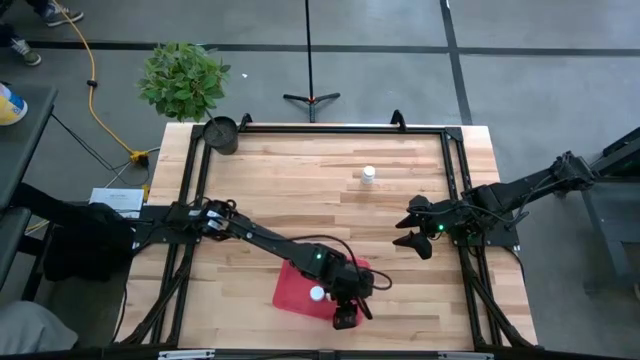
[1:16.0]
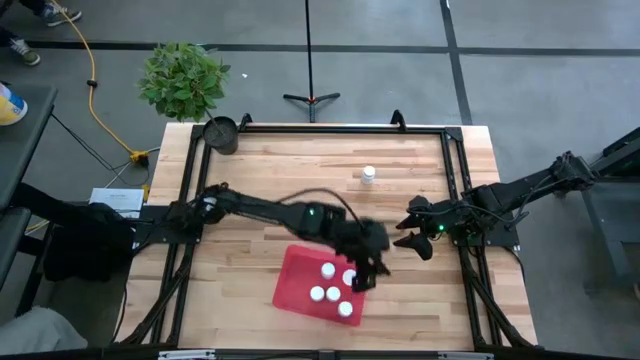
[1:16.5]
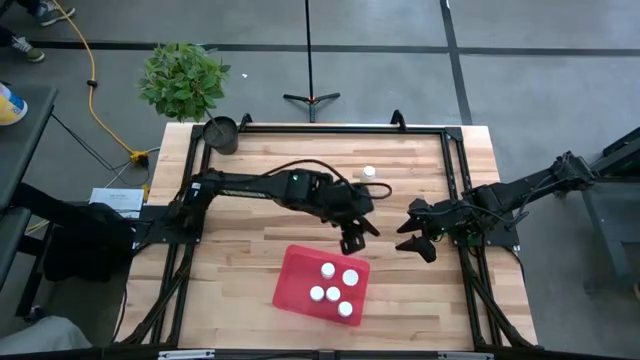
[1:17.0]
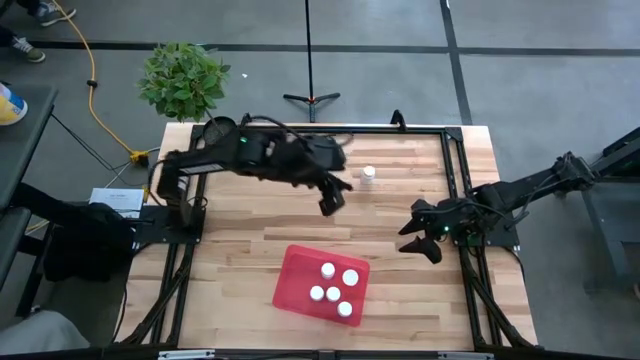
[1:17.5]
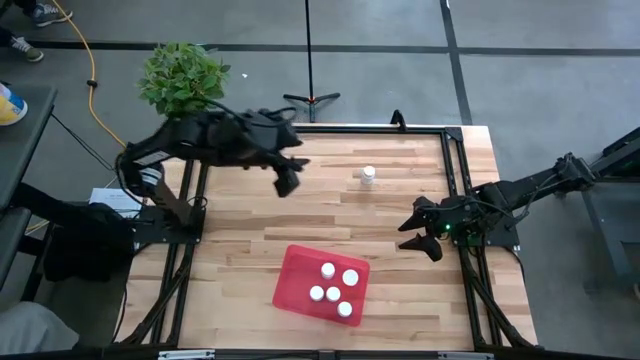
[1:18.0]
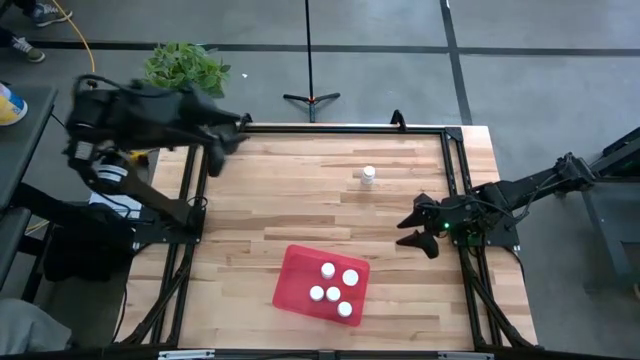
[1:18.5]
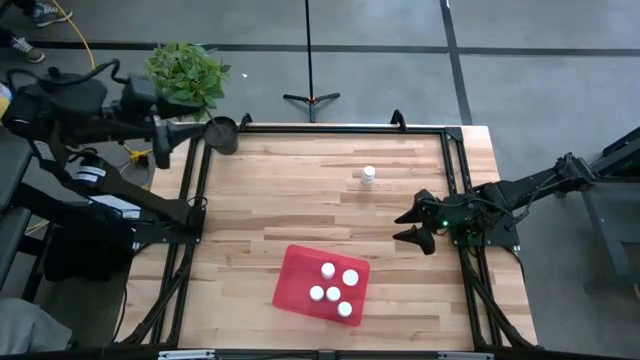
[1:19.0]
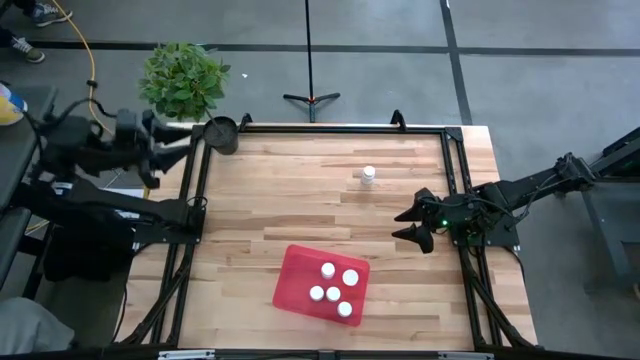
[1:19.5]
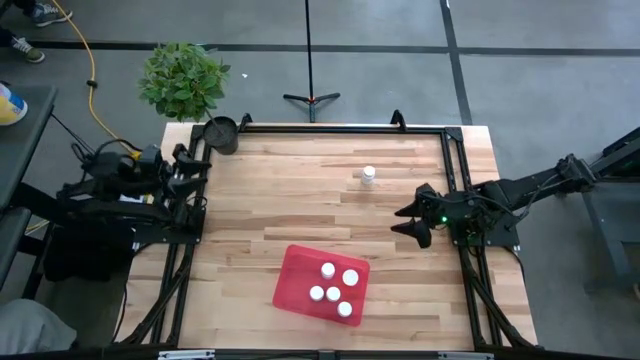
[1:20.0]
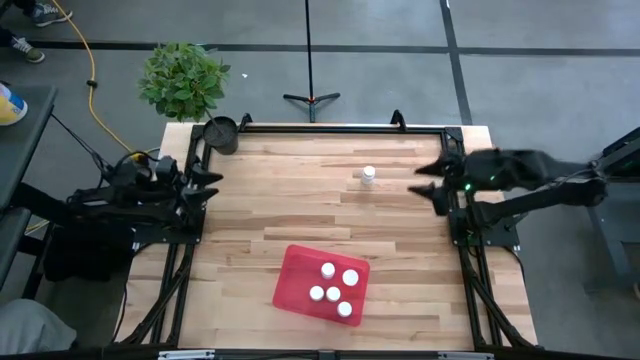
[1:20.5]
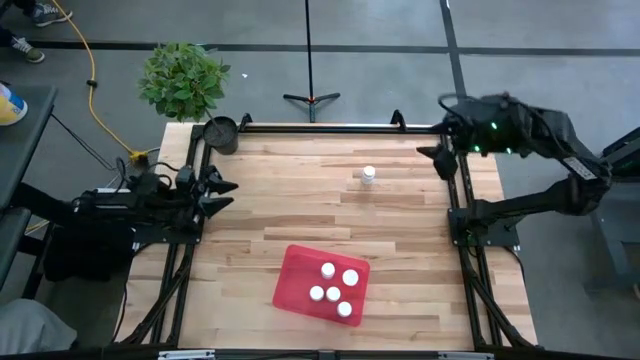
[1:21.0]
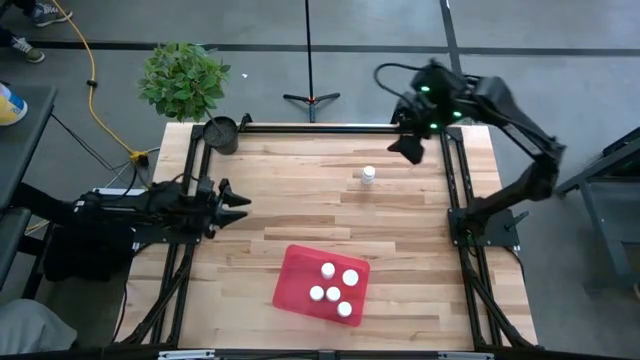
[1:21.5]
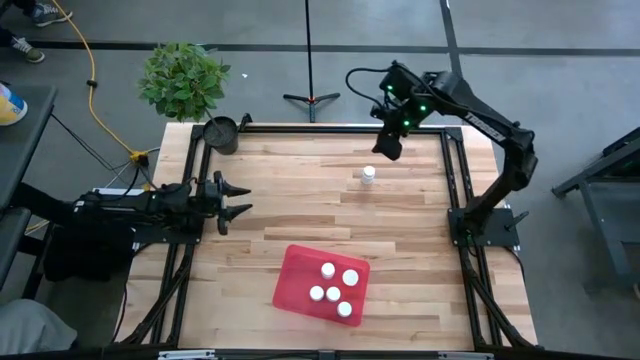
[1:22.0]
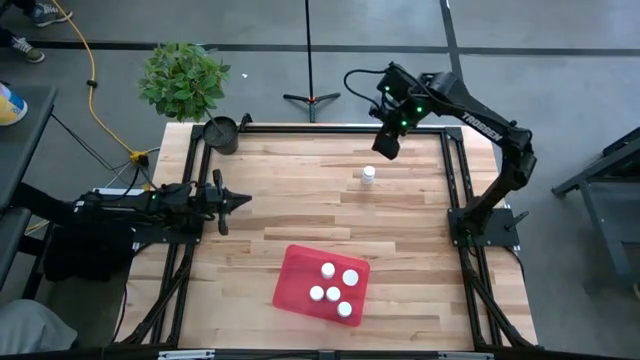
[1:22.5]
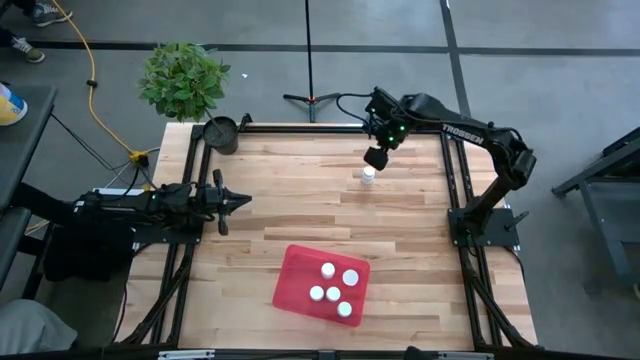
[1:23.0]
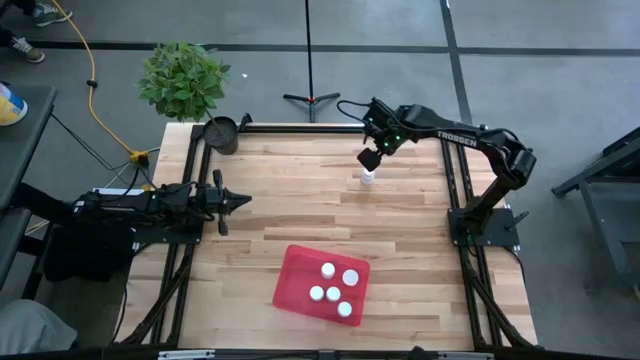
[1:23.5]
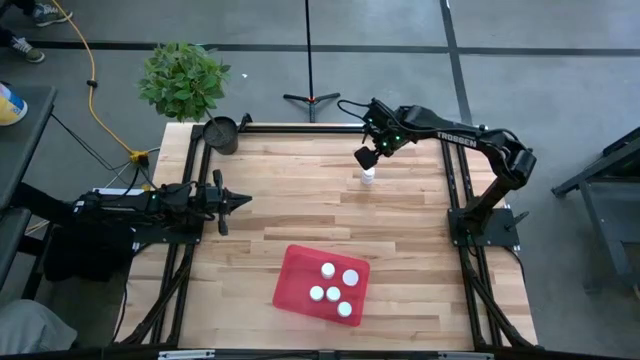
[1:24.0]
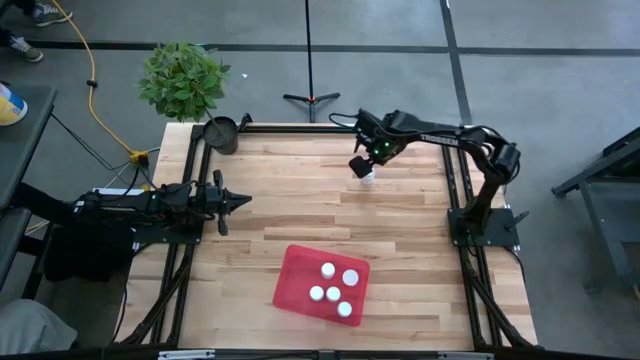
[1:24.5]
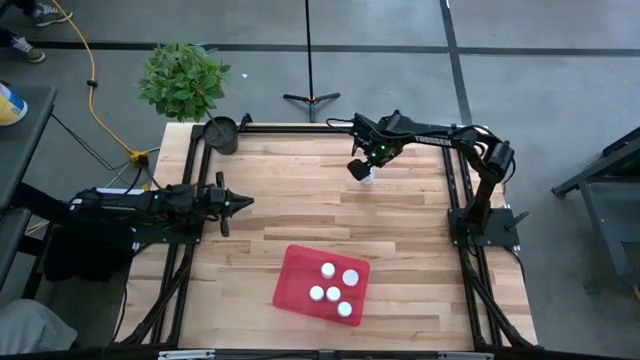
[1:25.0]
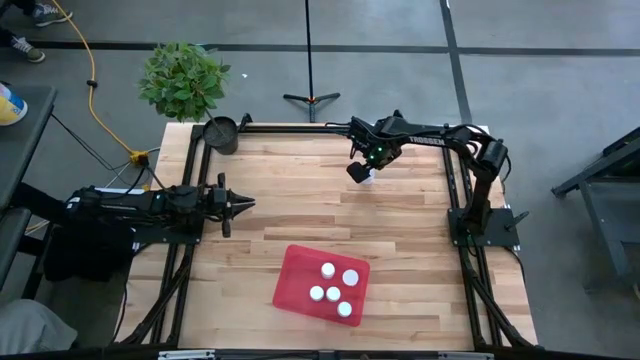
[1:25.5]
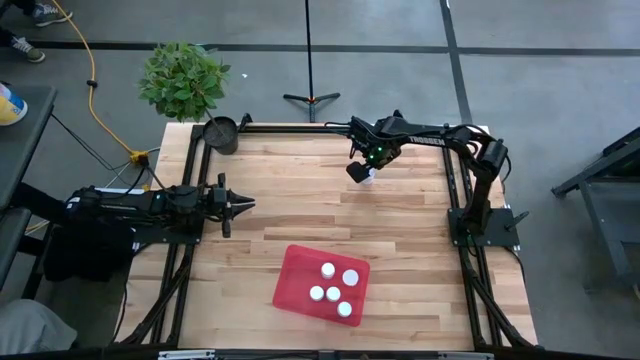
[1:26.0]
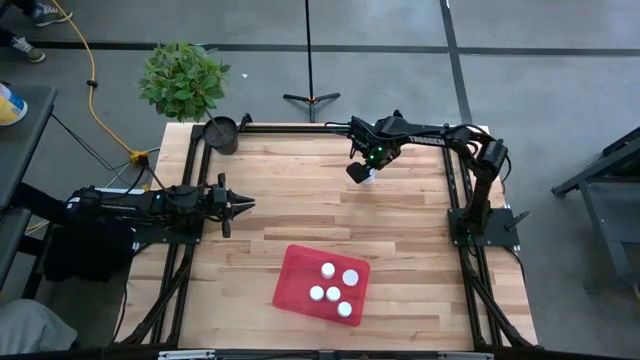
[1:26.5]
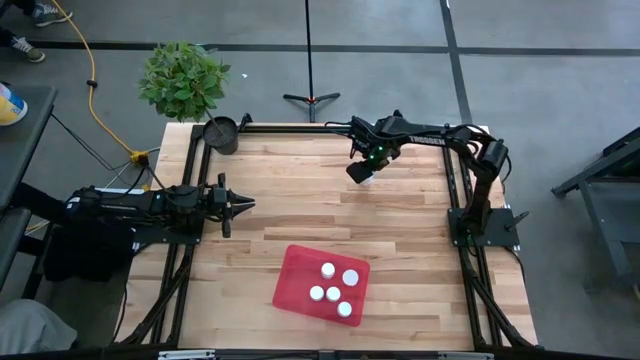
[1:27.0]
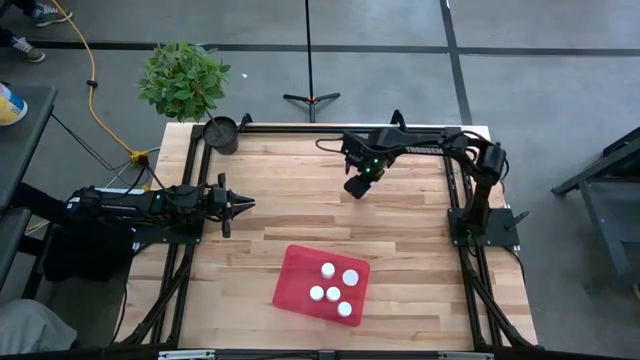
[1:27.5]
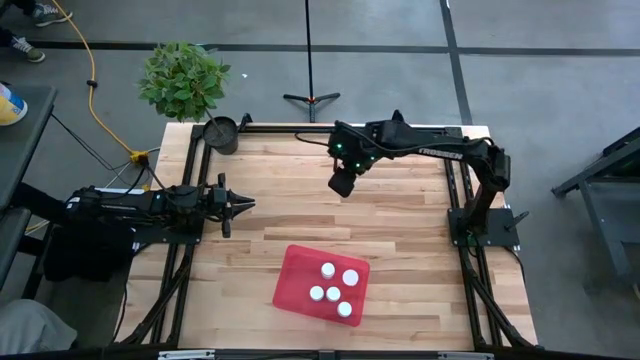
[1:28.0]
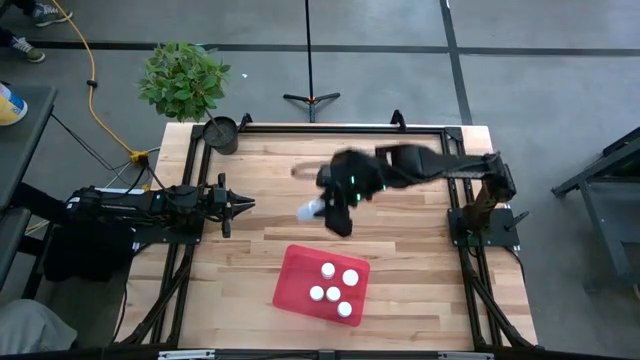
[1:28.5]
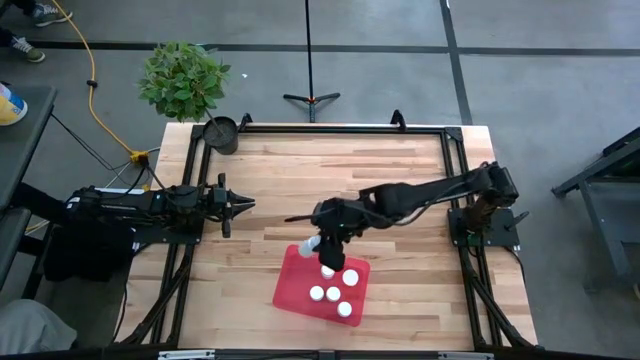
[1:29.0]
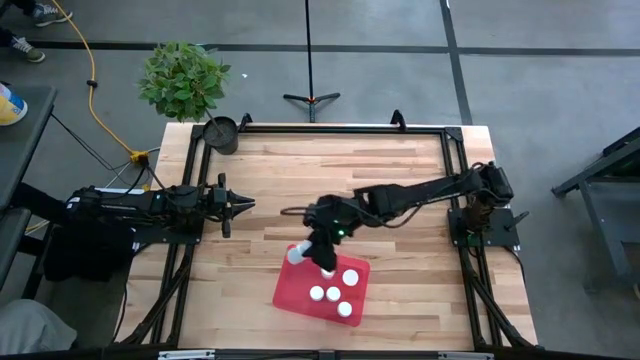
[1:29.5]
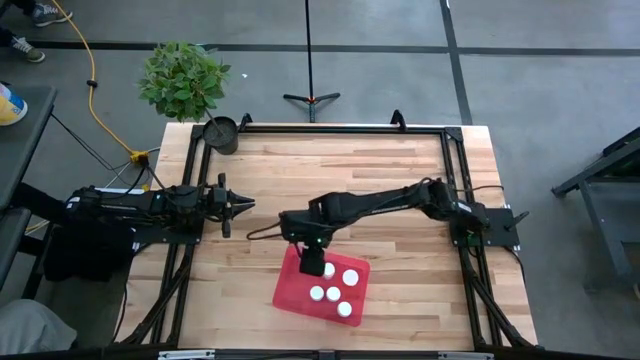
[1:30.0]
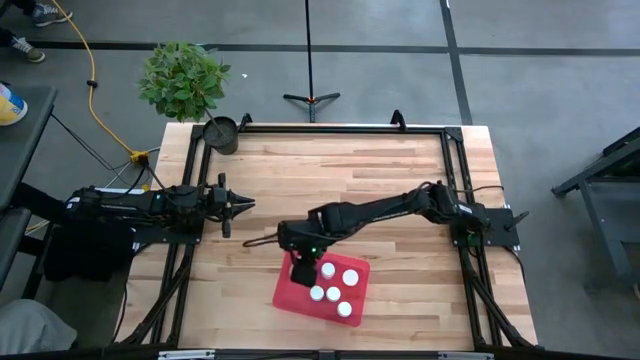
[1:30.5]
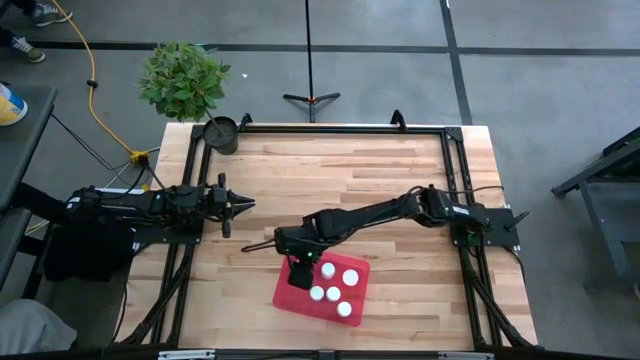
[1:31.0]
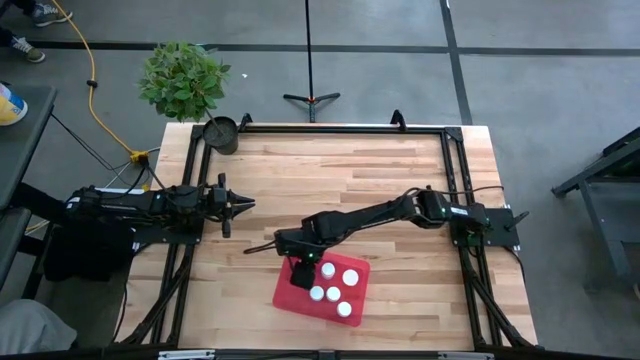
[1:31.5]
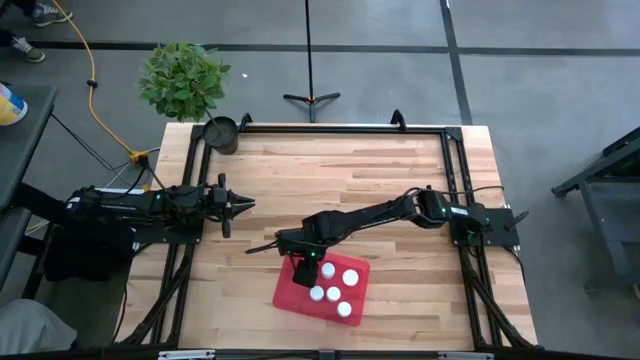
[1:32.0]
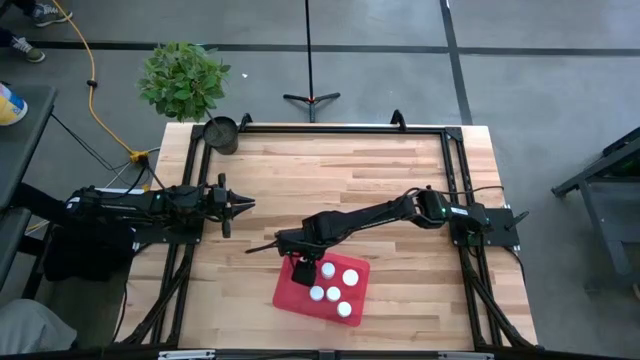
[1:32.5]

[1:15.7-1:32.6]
Task: Pick and place pill bottles into a basket
Put the white medicine bottle into the red container

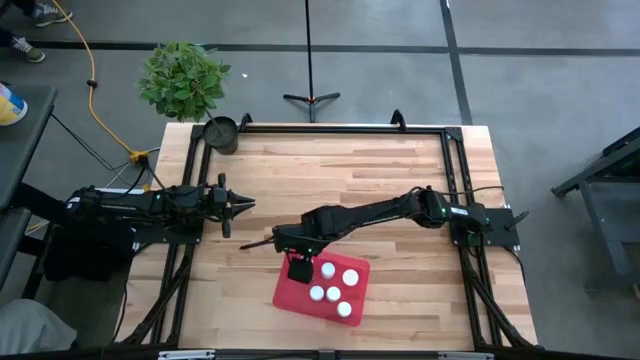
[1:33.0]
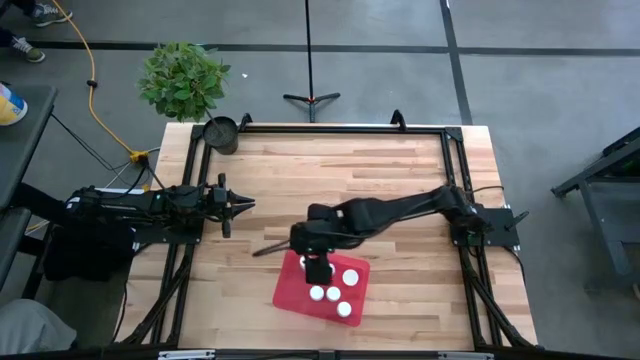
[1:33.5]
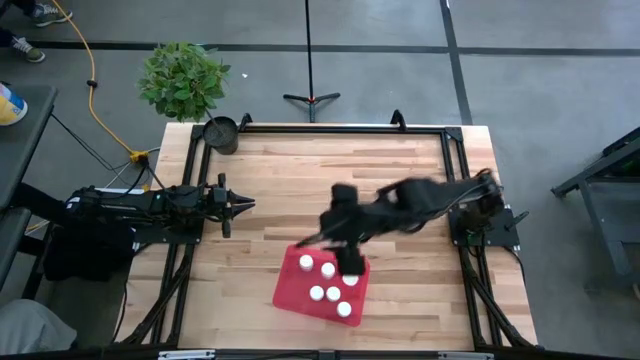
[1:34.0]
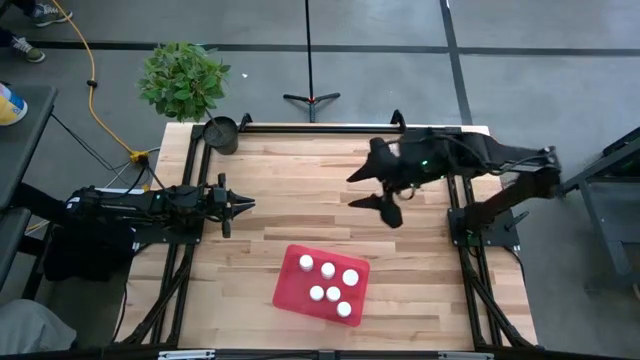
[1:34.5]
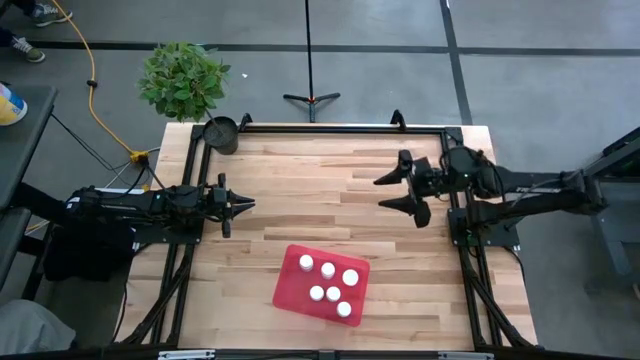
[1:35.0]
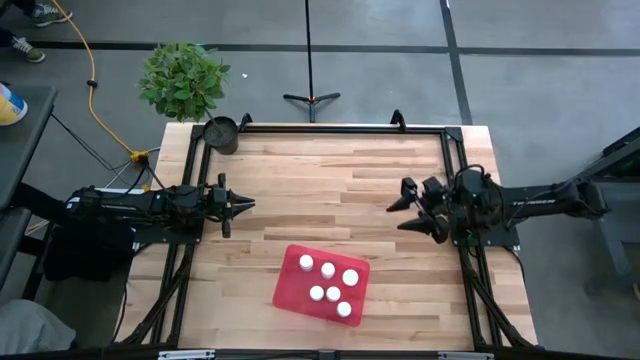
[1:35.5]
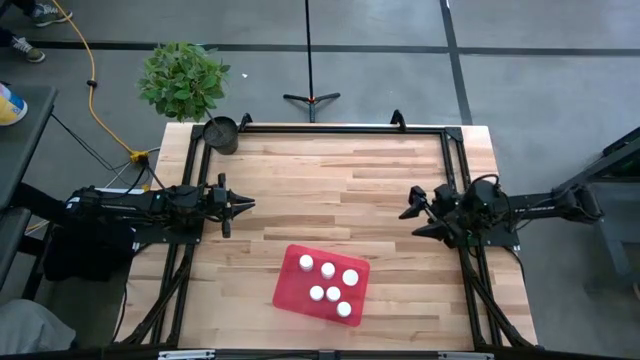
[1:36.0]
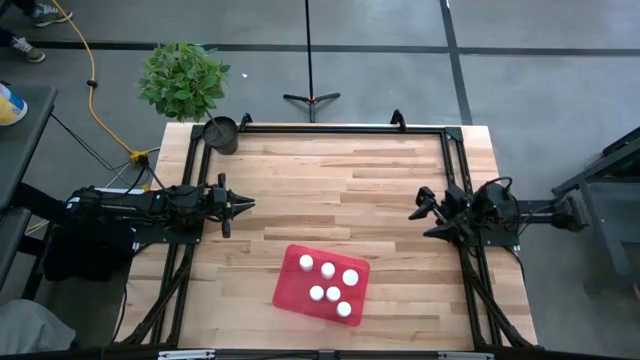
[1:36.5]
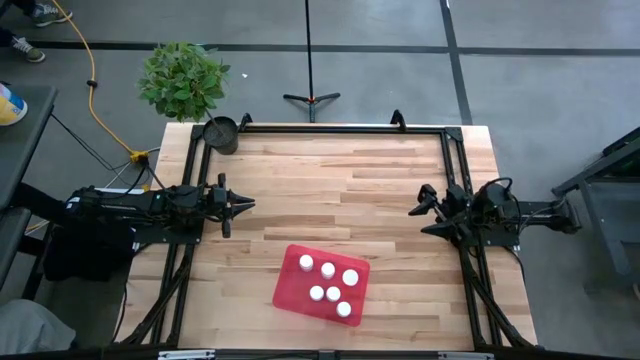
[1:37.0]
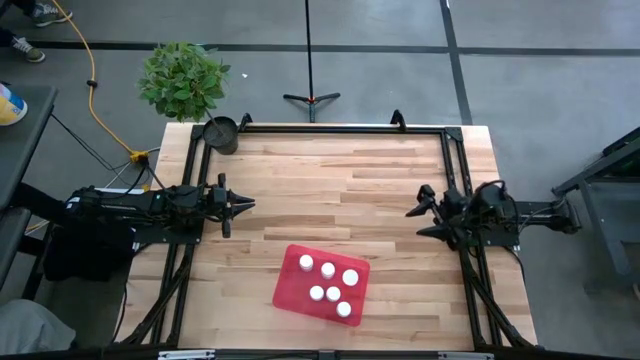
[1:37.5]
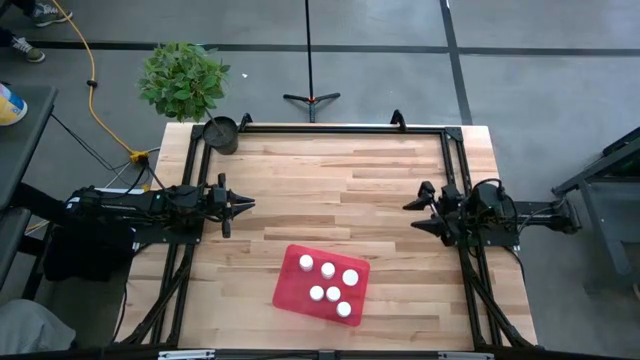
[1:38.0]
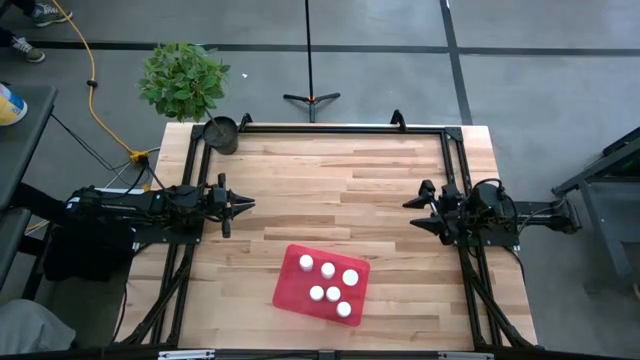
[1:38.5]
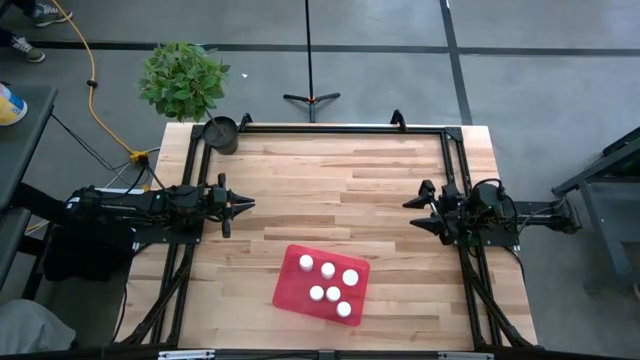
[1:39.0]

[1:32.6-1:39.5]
Return to Home Position
